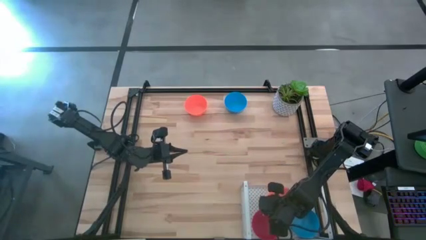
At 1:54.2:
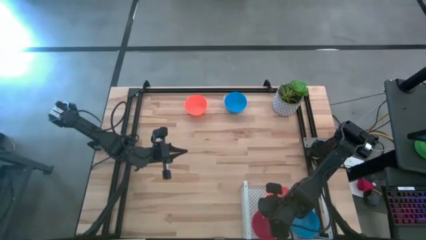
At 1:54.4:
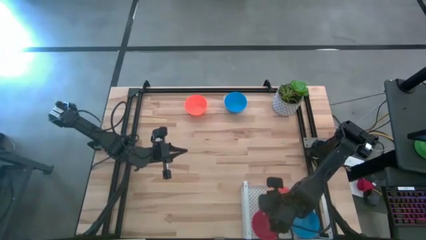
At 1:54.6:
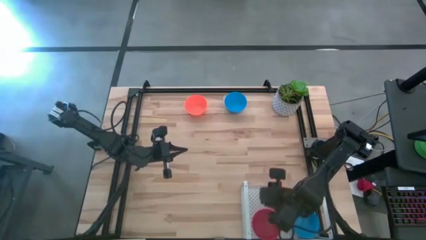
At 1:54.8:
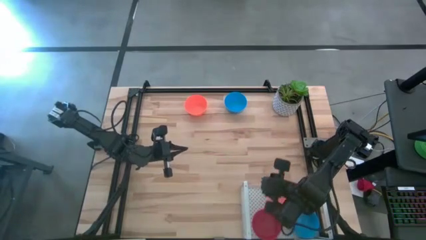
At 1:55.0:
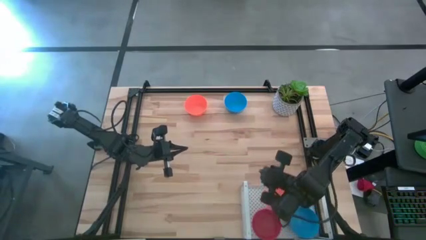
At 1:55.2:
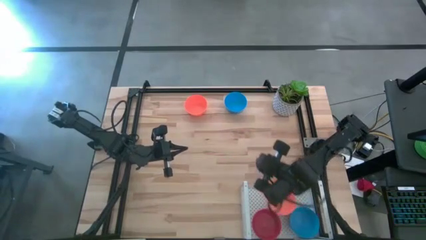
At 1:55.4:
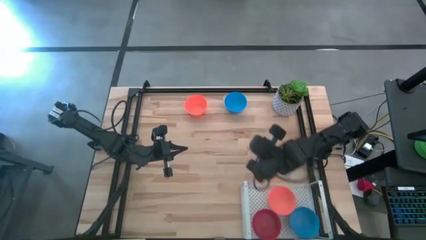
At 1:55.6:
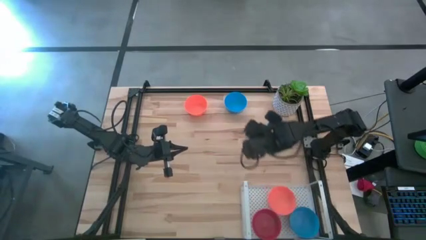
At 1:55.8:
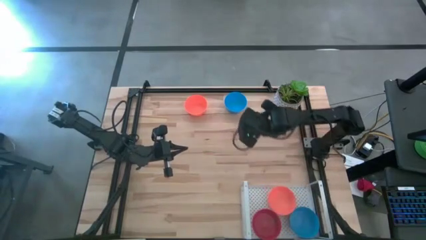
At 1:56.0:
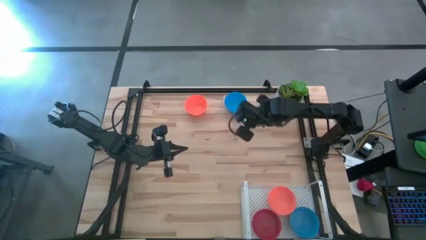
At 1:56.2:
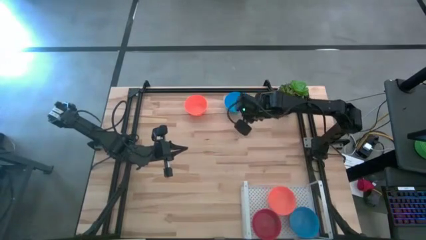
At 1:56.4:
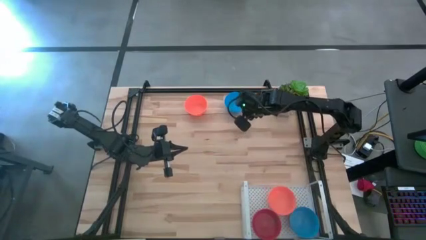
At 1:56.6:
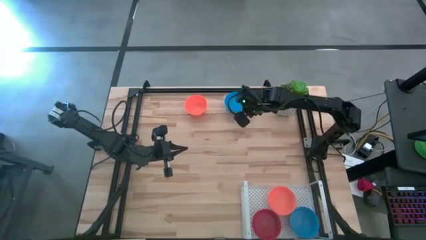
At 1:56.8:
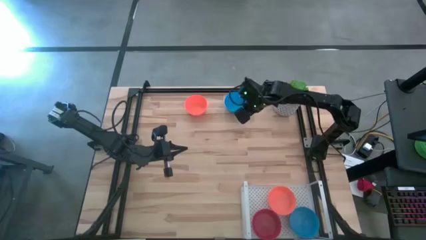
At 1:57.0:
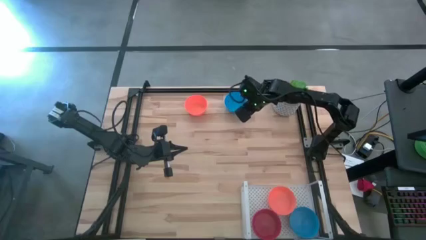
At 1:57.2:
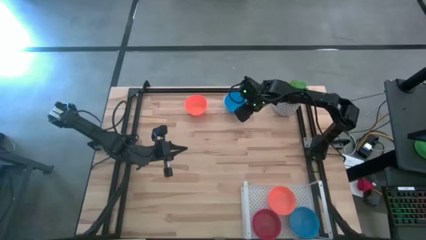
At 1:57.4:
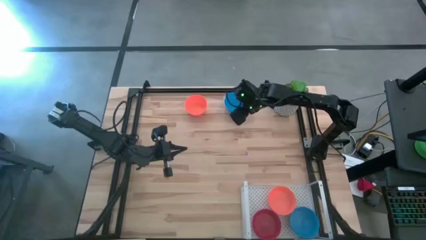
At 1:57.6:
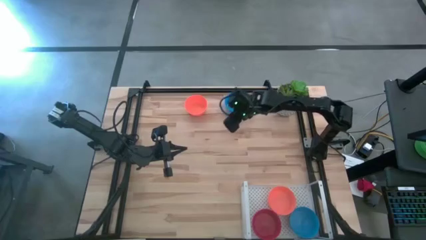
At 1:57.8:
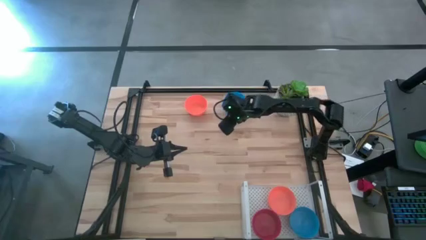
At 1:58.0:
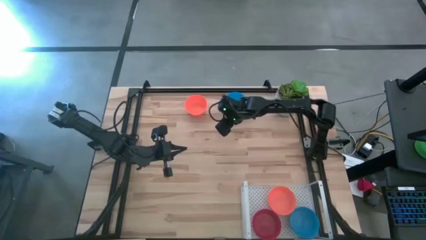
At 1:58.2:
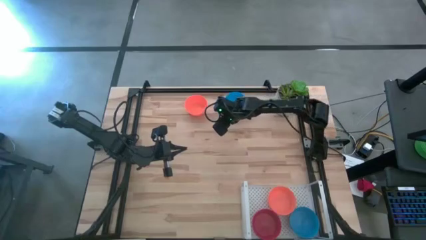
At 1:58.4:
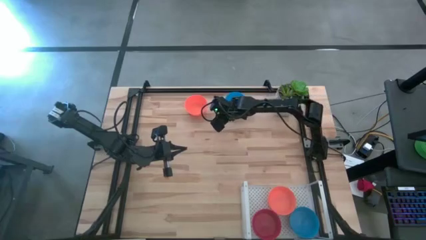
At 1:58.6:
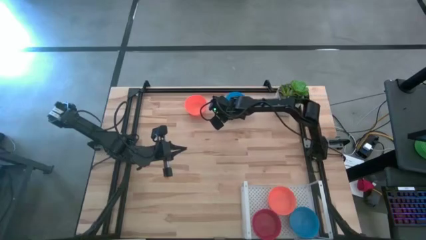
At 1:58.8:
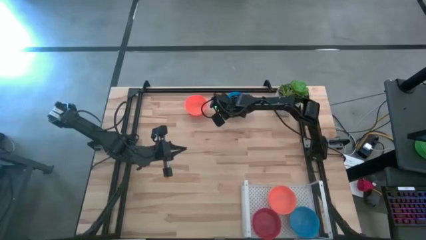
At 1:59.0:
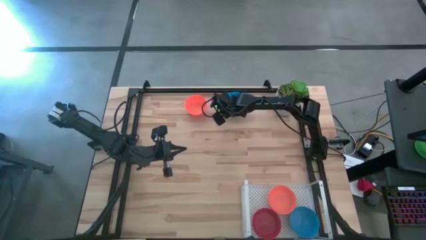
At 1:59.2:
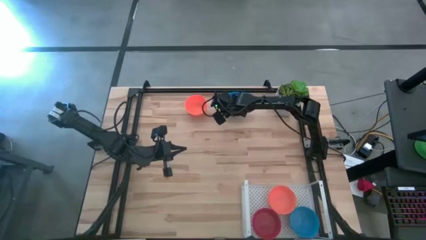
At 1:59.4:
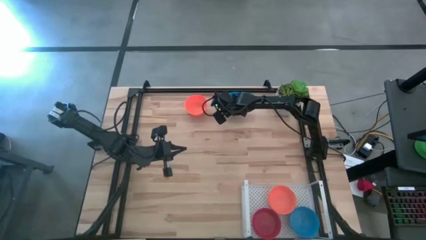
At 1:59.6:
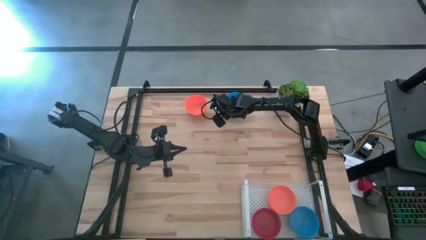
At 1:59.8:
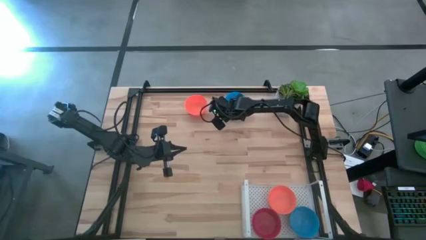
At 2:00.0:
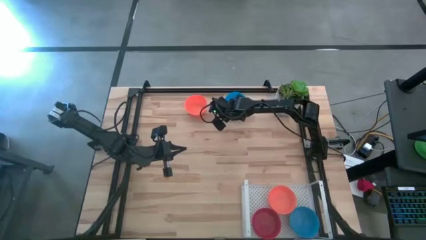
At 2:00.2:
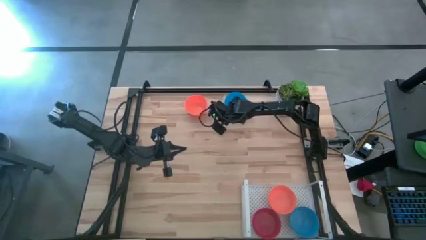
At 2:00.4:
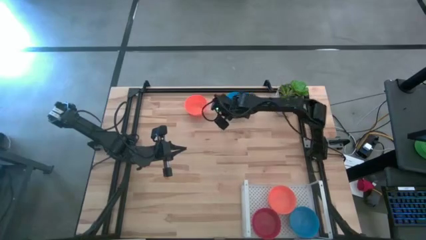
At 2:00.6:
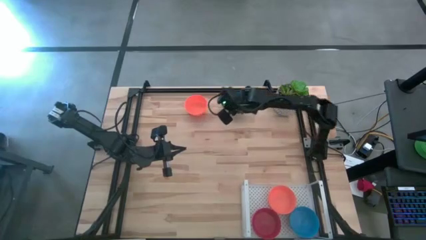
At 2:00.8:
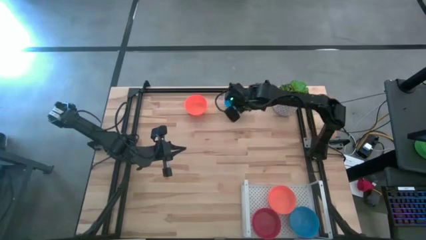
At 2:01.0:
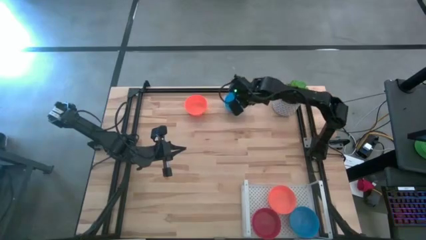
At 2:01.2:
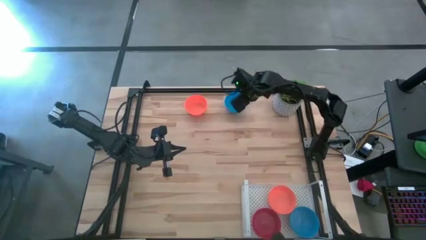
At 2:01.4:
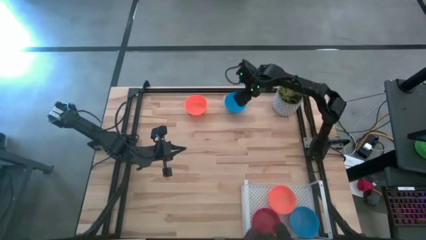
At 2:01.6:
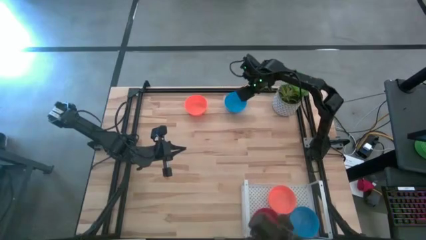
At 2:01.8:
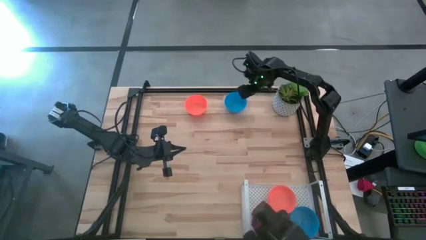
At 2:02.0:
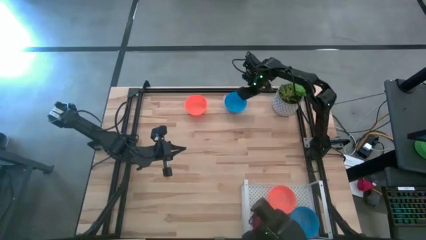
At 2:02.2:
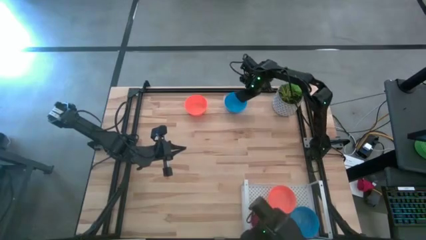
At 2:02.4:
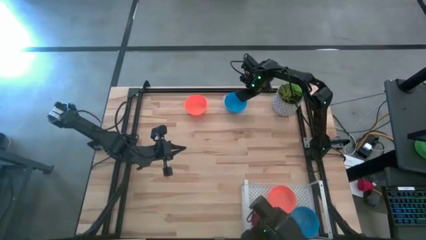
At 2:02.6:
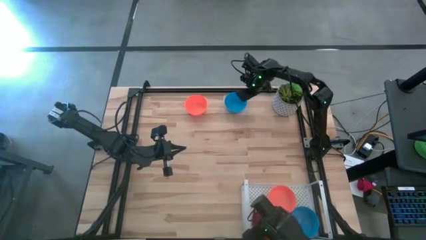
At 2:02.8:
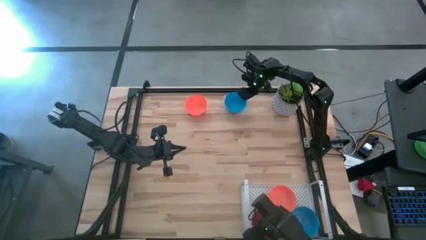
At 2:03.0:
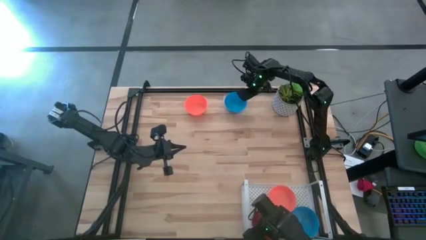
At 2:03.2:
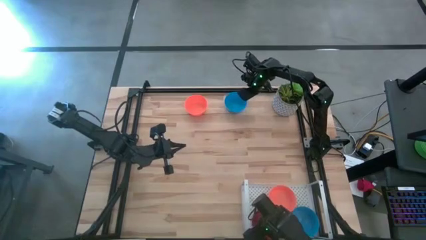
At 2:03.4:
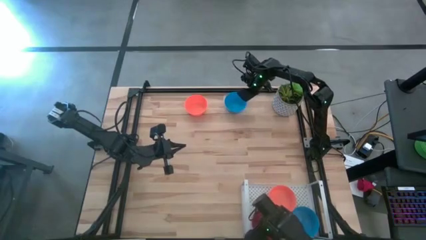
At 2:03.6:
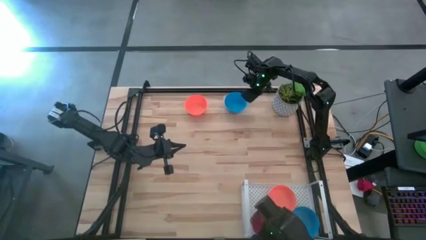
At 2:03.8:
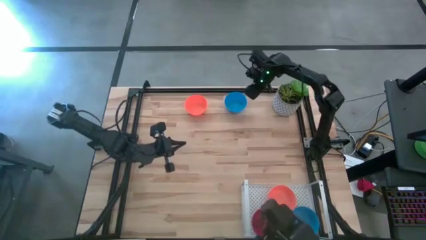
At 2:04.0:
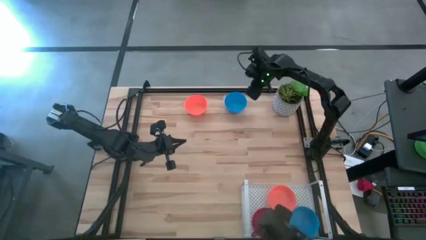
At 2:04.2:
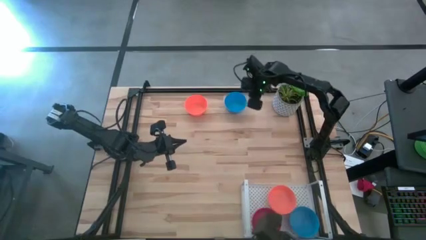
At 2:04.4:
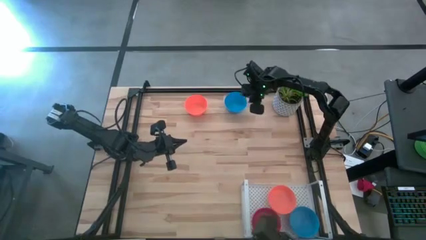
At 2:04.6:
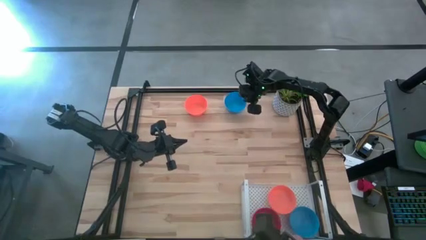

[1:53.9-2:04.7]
Task: Pick & Place Mini bowls
Stack the blue bowl on top of the blue bowl on the shelf

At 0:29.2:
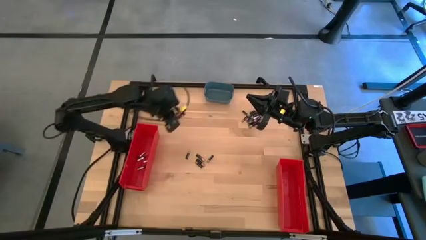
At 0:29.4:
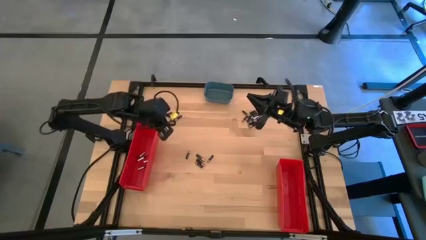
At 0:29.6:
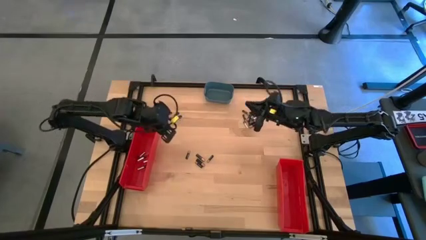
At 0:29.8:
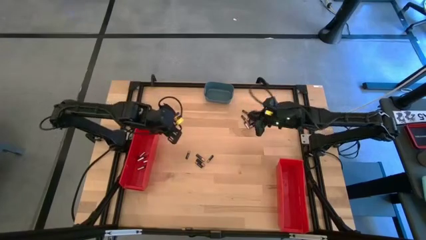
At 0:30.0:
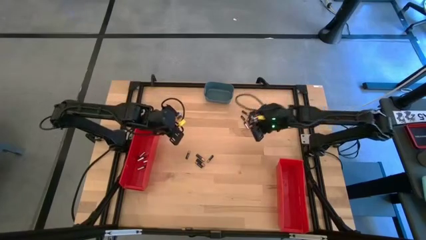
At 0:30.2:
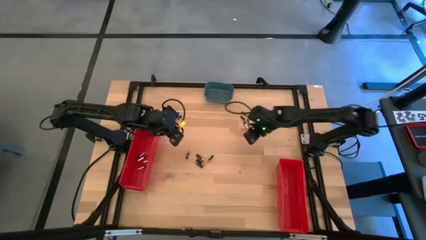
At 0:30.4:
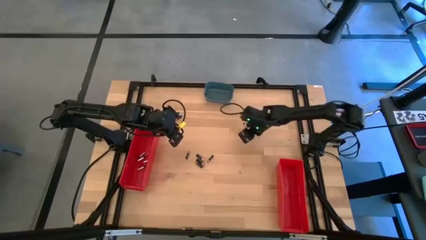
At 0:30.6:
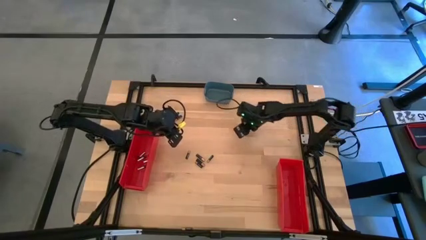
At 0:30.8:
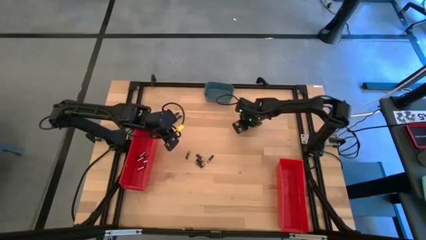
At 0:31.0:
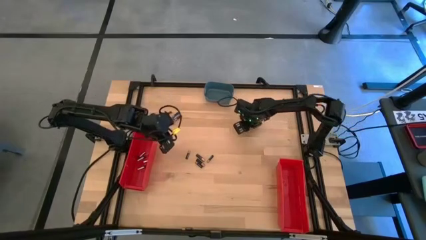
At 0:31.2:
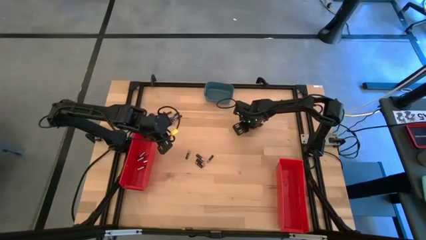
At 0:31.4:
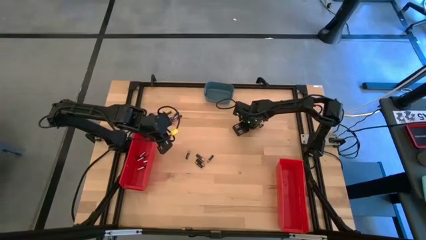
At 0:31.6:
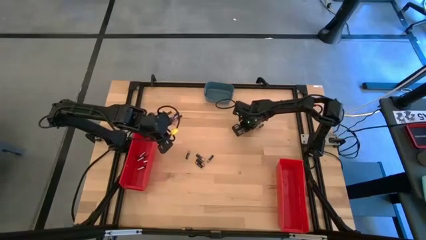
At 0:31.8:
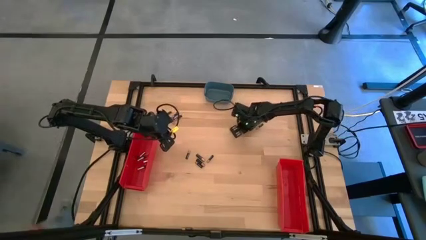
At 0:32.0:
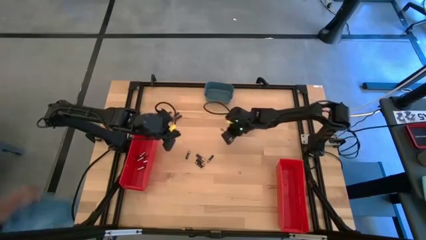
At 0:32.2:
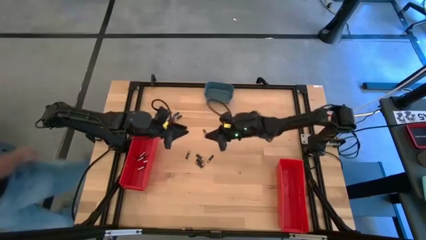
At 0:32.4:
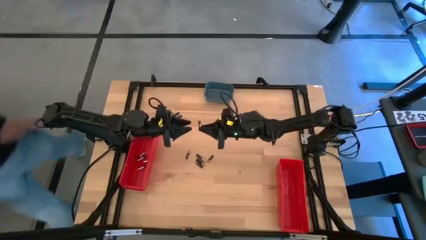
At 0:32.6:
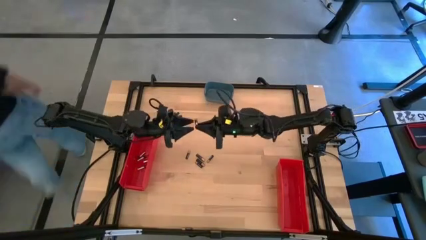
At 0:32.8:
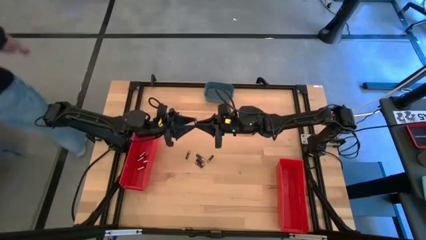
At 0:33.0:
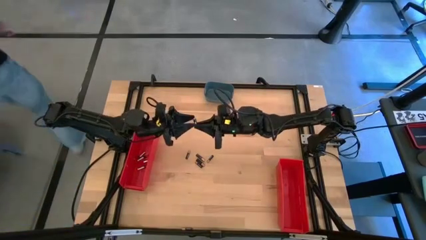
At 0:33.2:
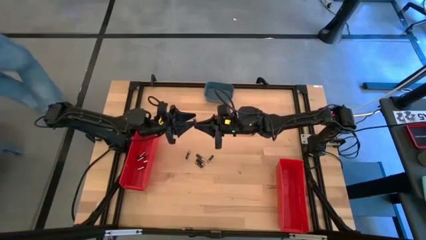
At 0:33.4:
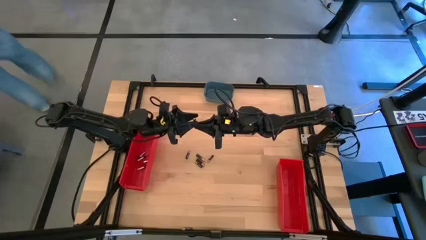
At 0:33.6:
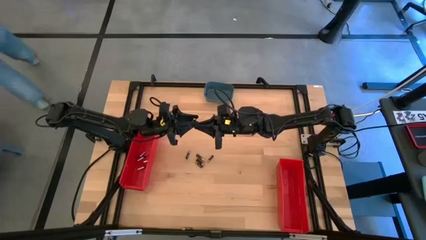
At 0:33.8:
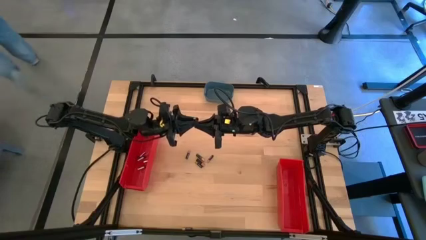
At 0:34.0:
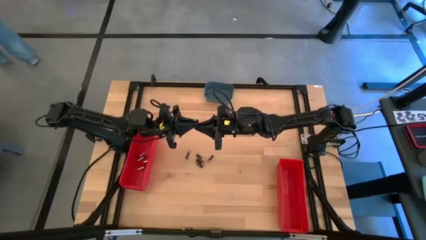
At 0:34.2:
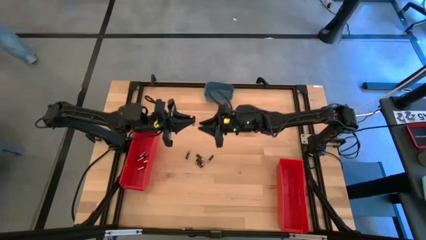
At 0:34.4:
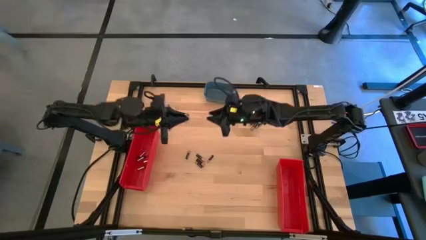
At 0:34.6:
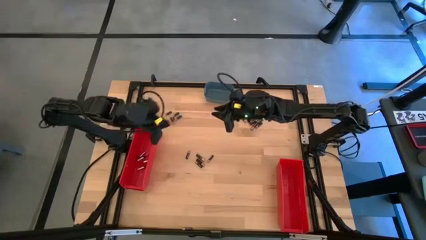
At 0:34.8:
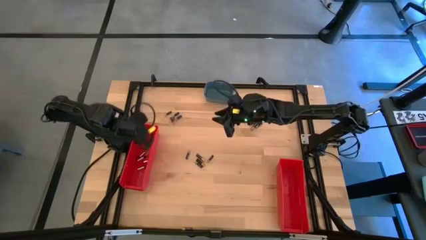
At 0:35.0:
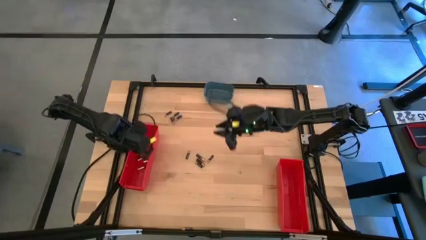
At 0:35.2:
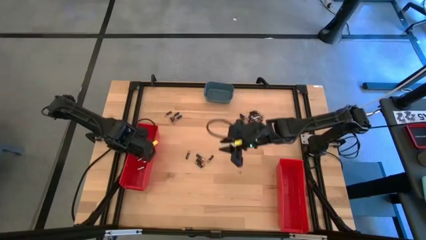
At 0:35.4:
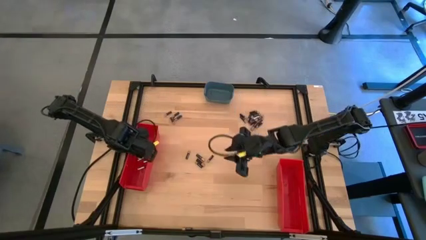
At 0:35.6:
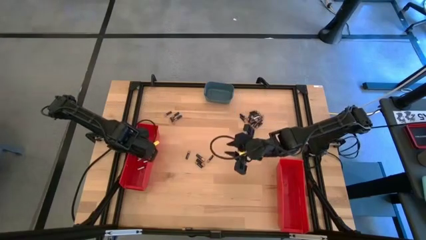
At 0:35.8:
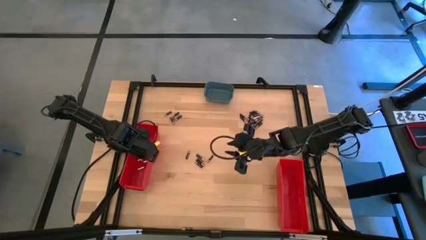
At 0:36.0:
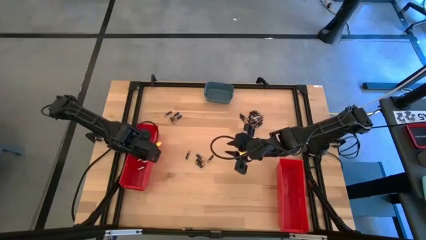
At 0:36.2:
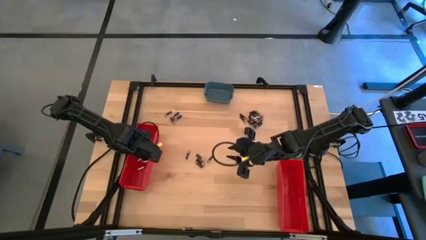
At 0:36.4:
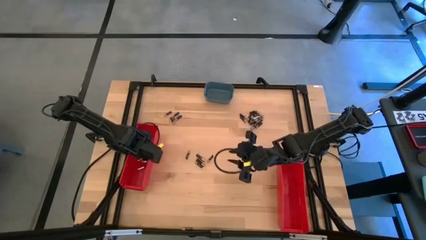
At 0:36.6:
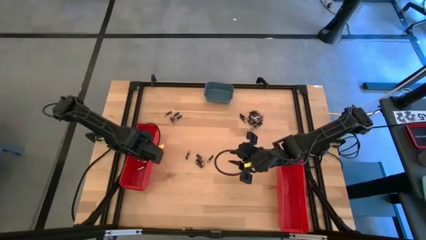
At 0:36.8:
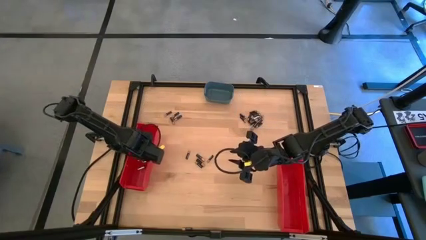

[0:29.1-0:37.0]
Task: Sort batteries
Put the silver battery into the left red bin
